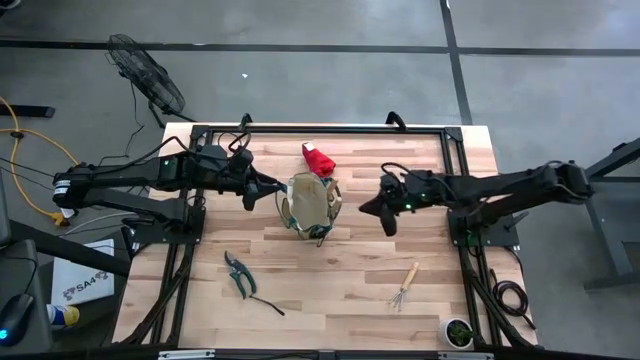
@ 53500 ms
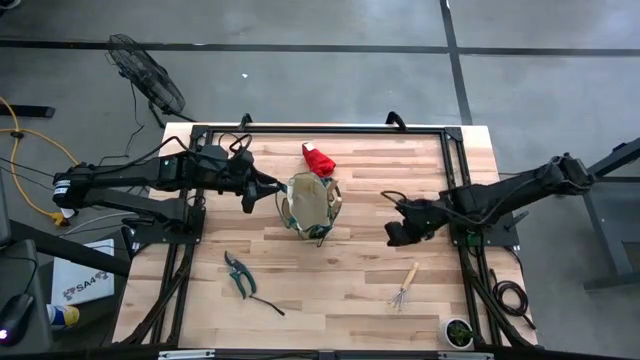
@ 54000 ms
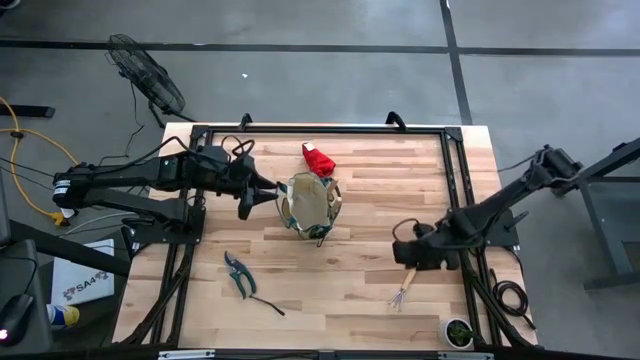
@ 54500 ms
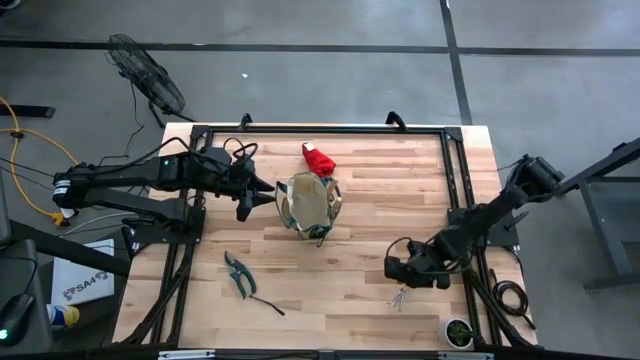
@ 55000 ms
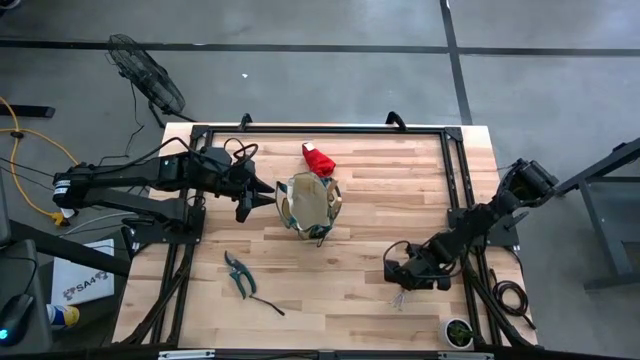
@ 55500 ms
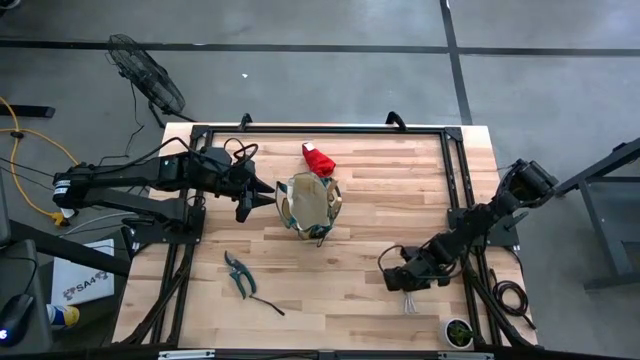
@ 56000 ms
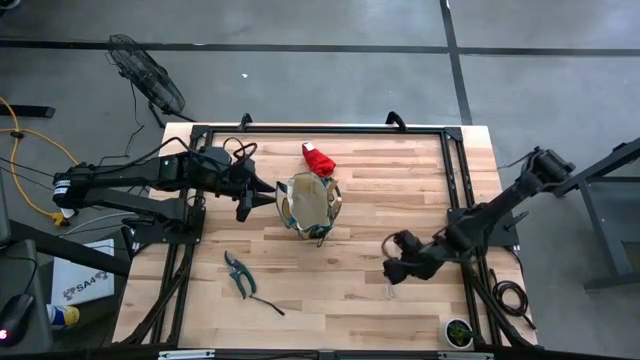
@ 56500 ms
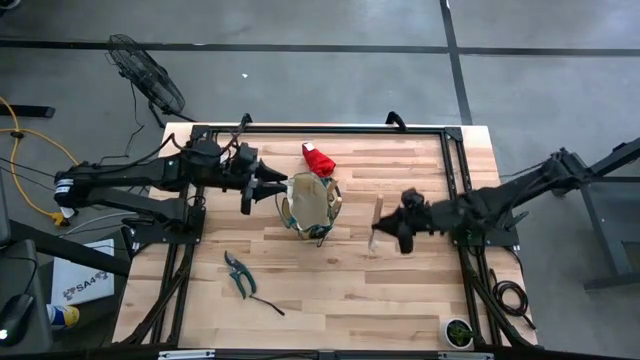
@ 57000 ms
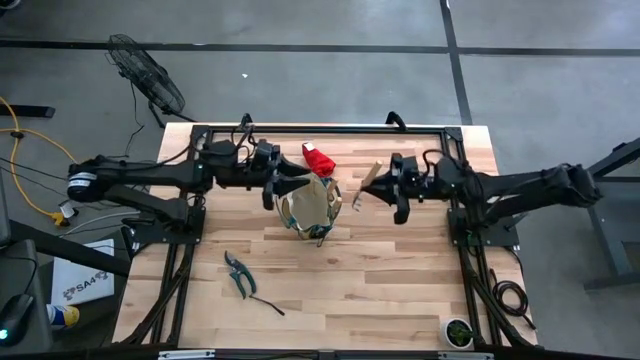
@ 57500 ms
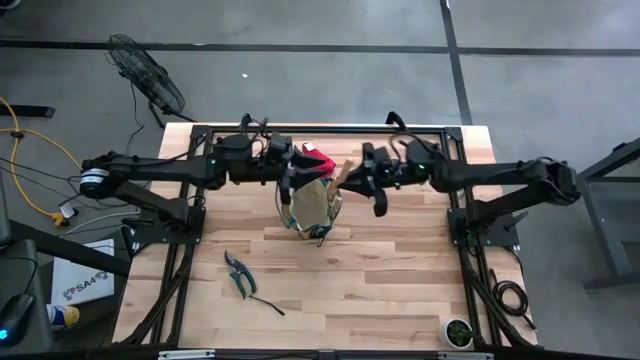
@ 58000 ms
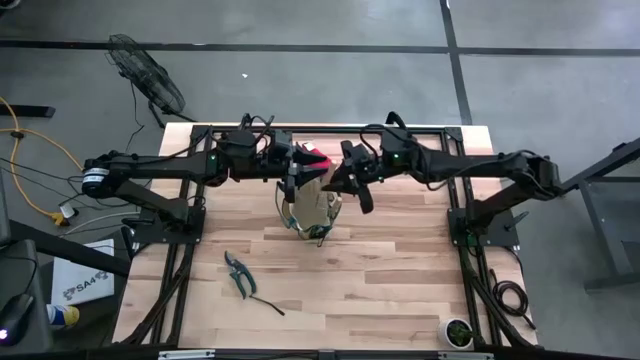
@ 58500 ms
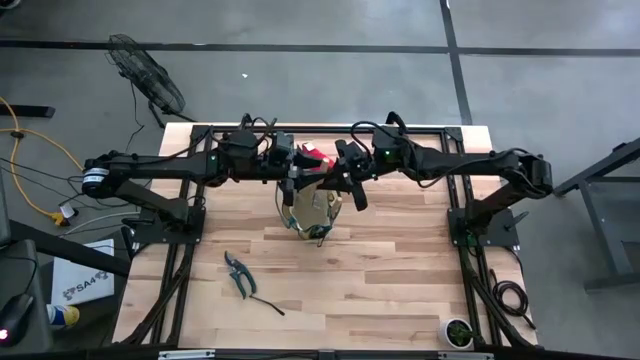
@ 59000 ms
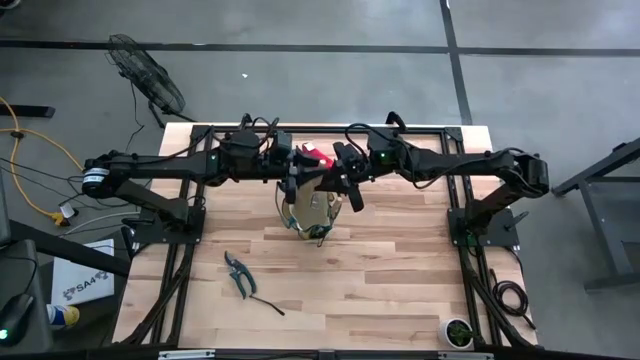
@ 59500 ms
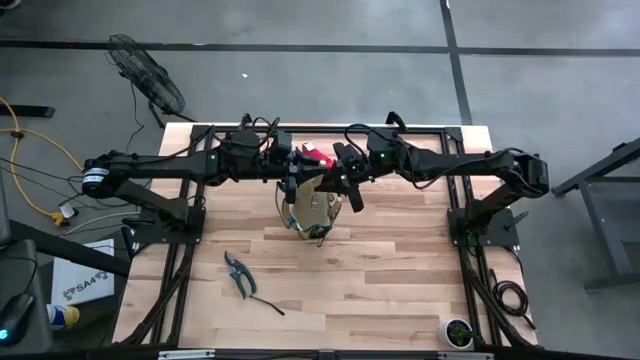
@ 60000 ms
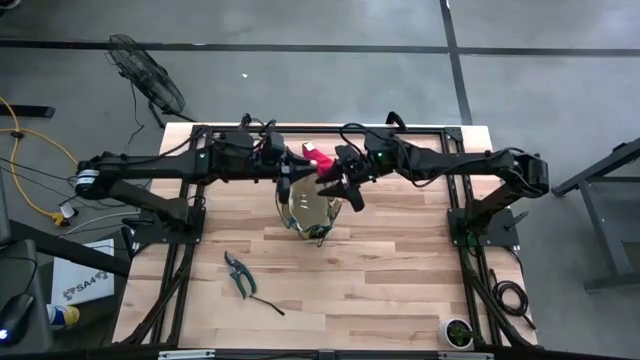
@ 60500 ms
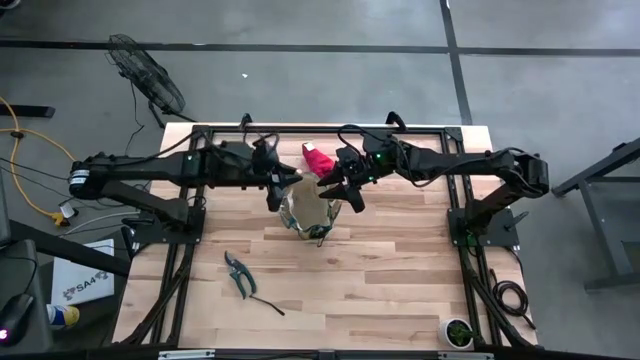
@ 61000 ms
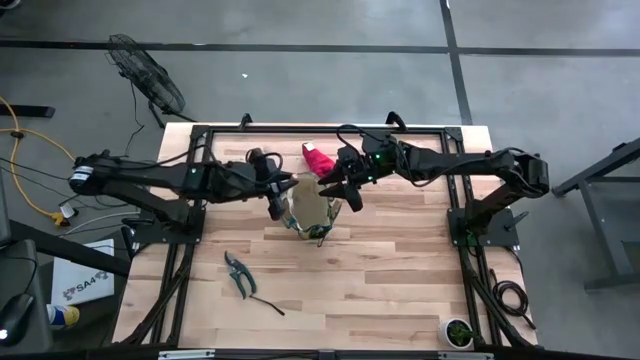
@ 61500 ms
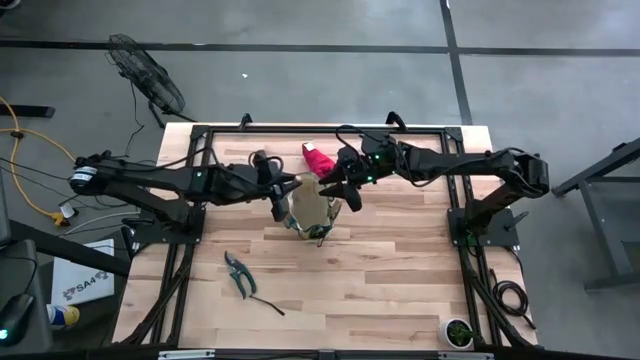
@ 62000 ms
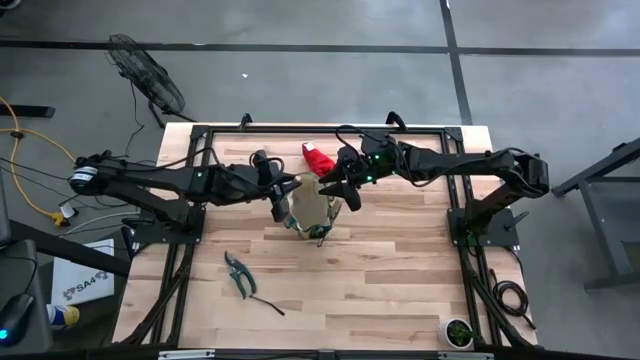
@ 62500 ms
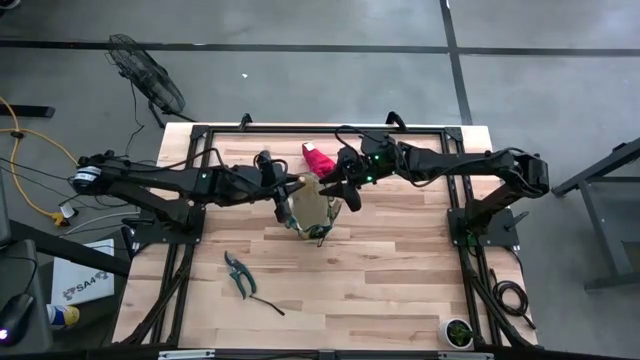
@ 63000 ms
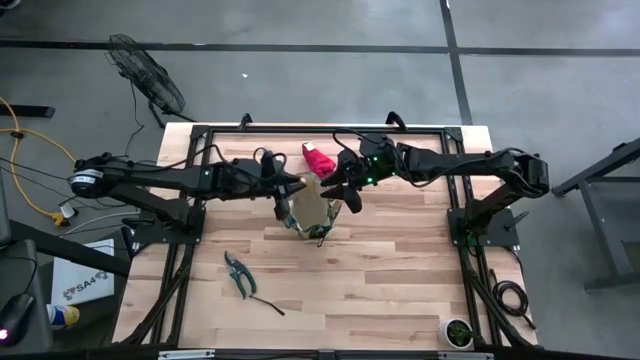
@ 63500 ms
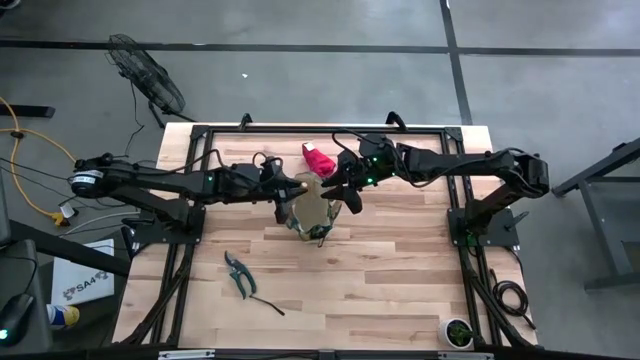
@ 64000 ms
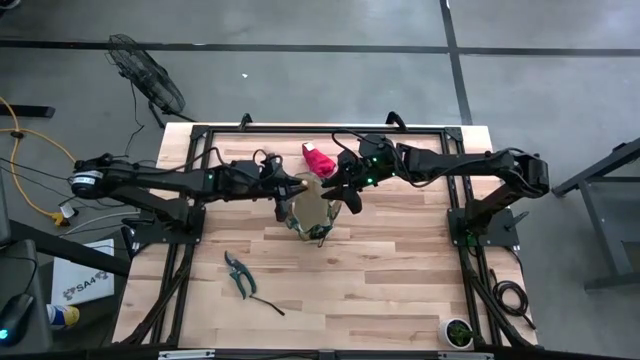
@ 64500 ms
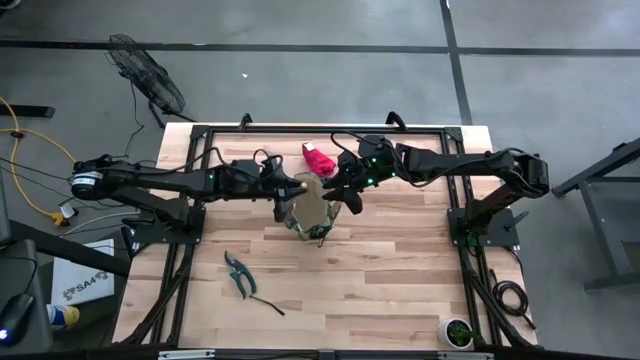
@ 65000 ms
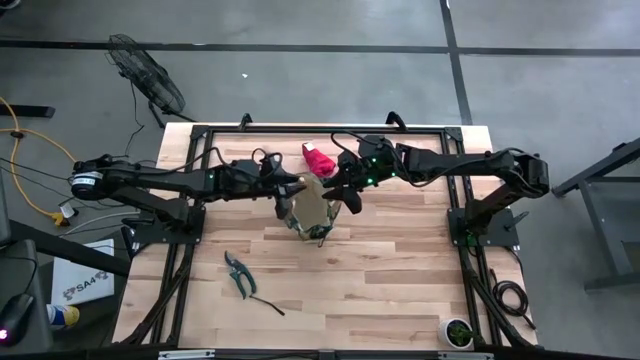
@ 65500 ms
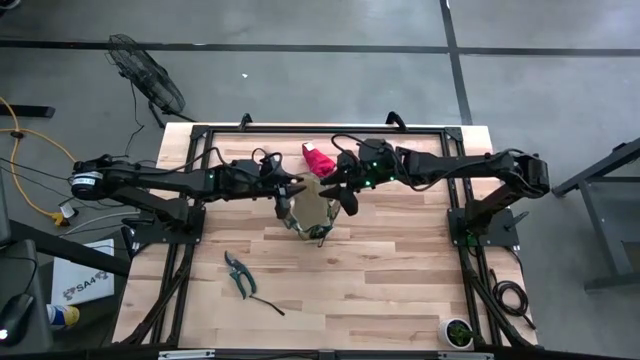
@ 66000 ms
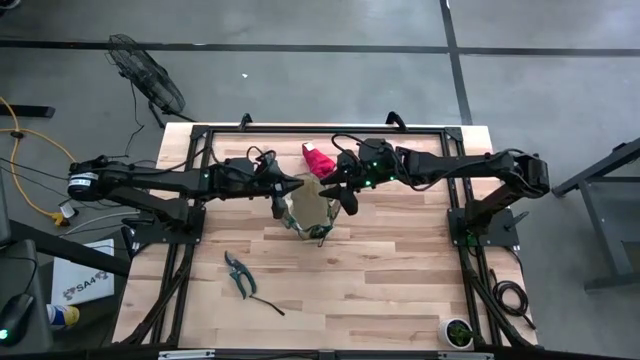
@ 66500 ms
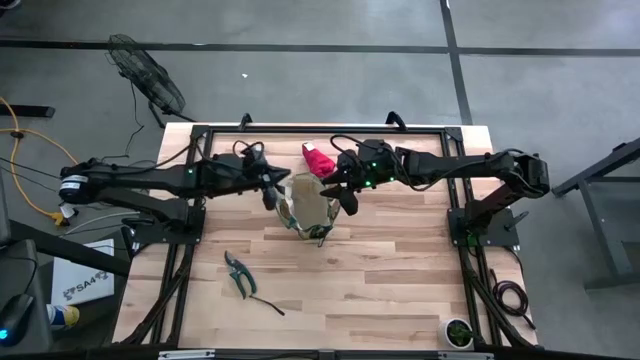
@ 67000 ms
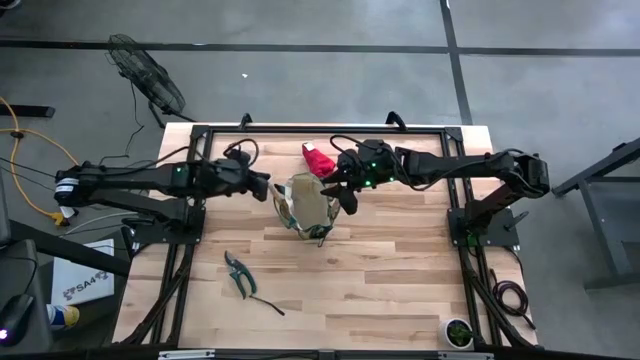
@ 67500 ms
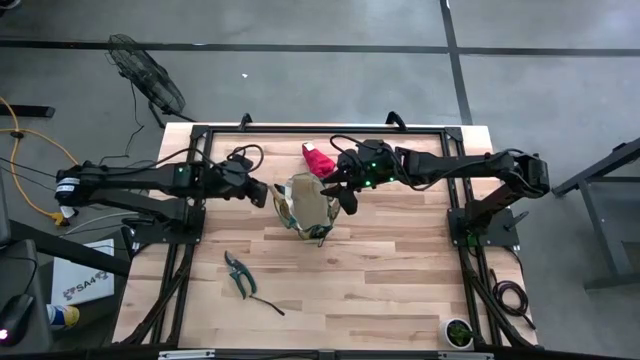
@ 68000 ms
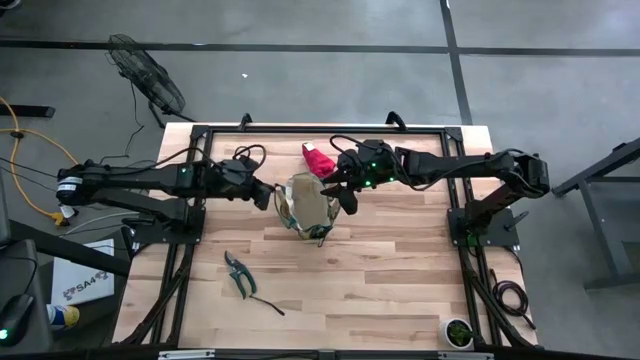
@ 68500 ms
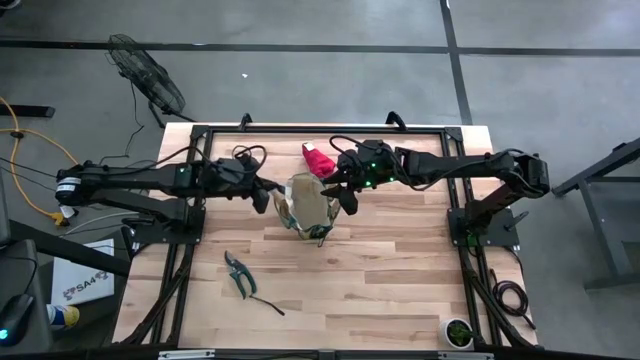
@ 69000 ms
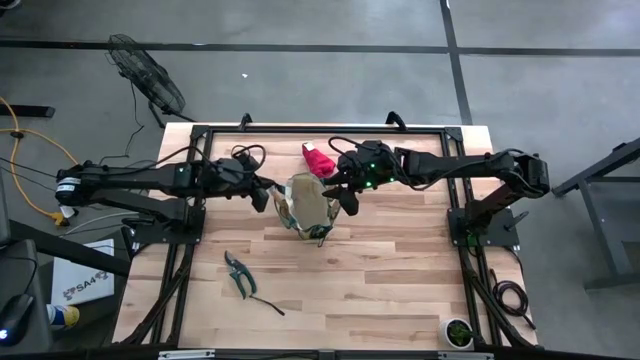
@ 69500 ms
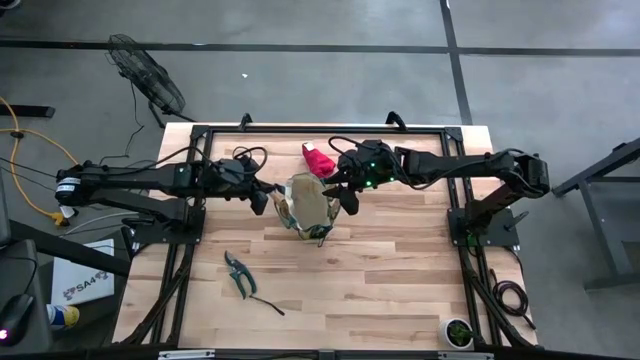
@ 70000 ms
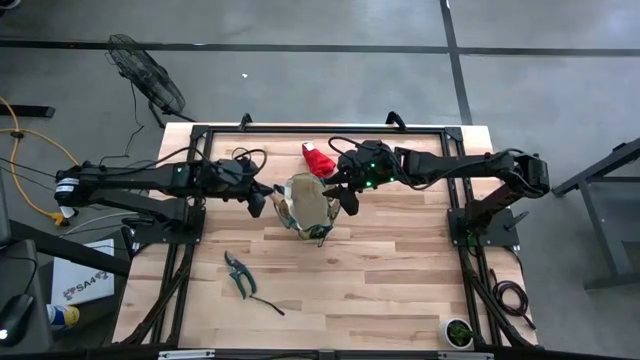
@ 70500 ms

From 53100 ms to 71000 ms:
Task: Pick & Place Garden tools in Gardening bag
Put the brown hand rake into the brown gardening bag

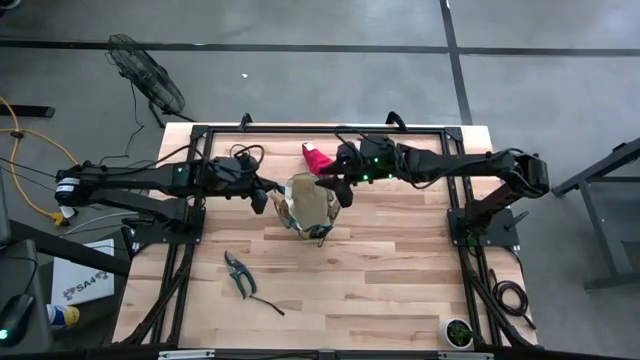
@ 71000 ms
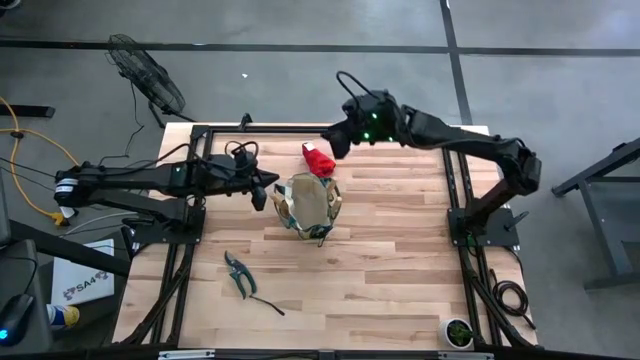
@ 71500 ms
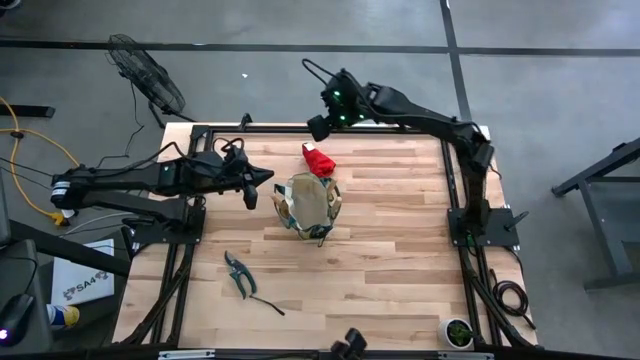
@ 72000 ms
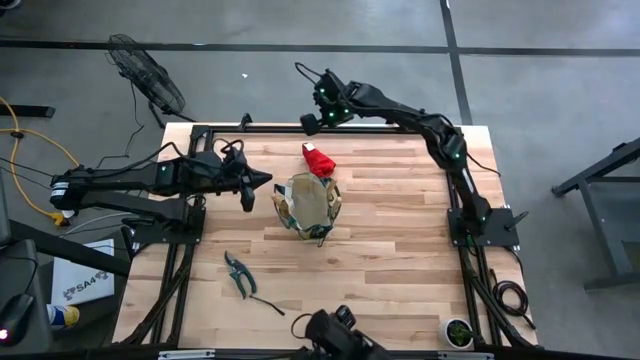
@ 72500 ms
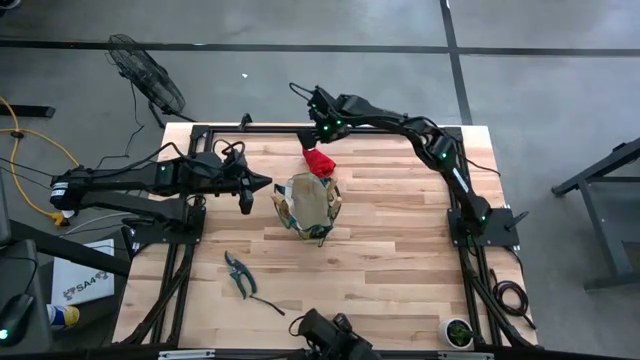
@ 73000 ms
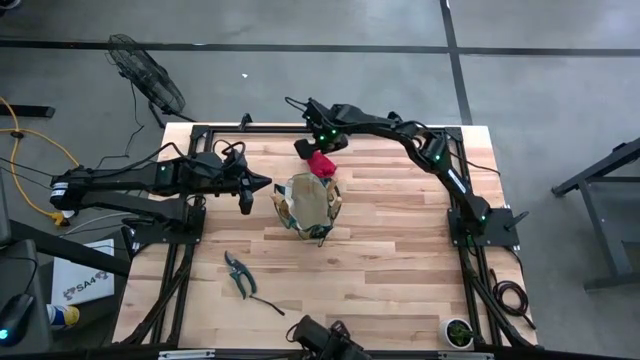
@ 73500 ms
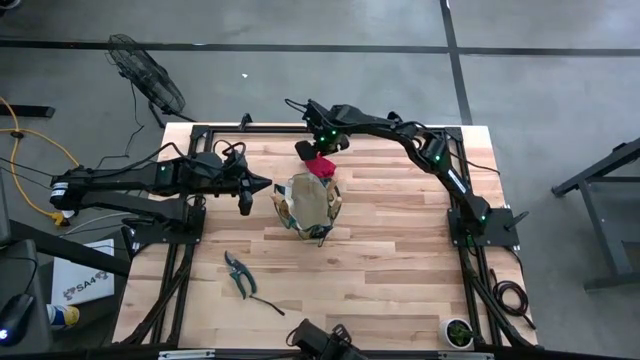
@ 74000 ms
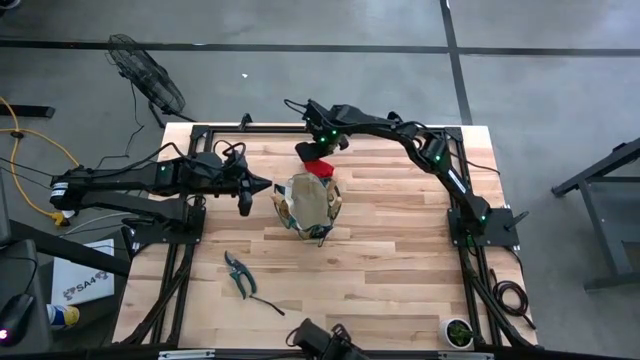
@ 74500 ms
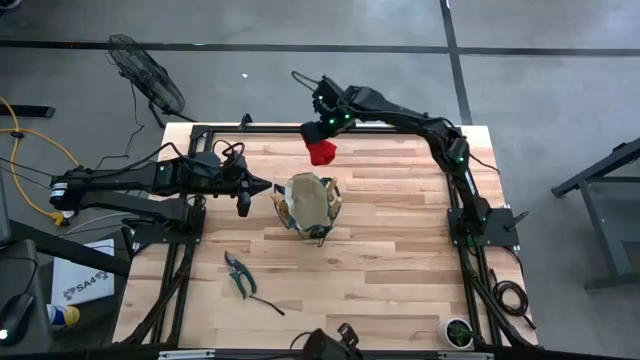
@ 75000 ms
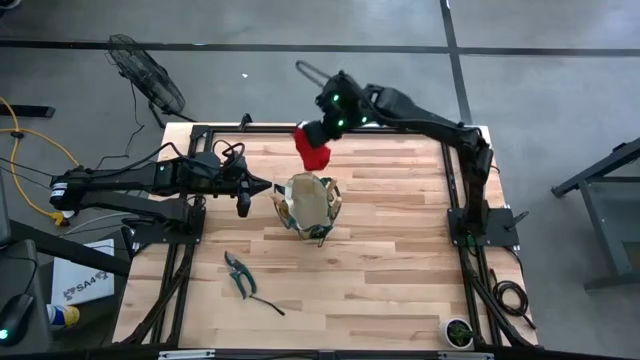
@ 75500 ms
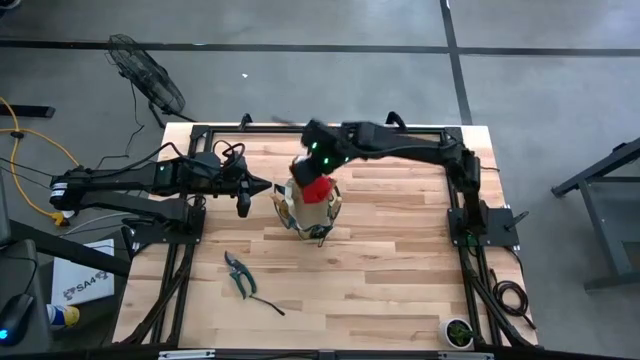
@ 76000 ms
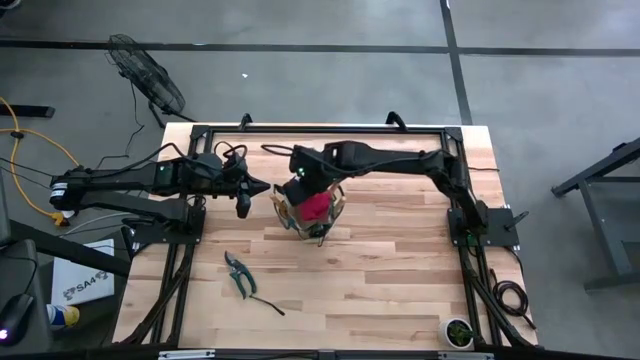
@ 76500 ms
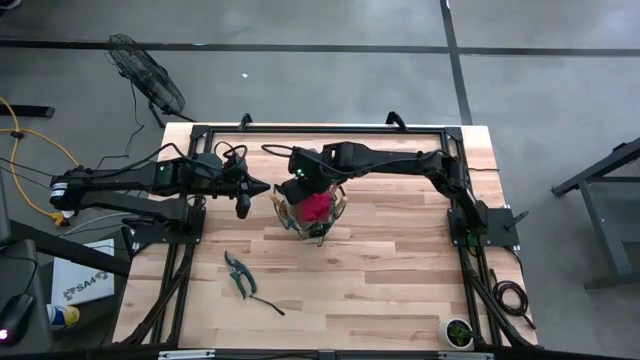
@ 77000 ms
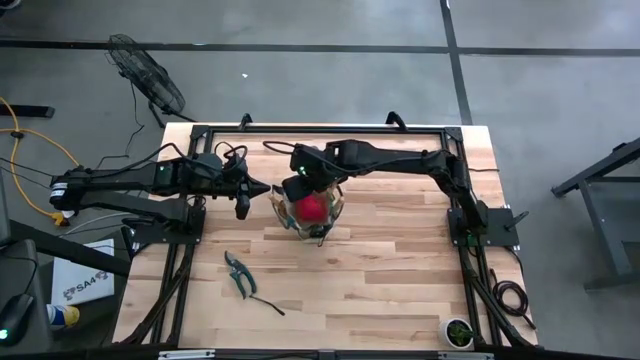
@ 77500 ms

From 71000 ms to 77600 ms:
Put the red gloves into the brown gardening bag
